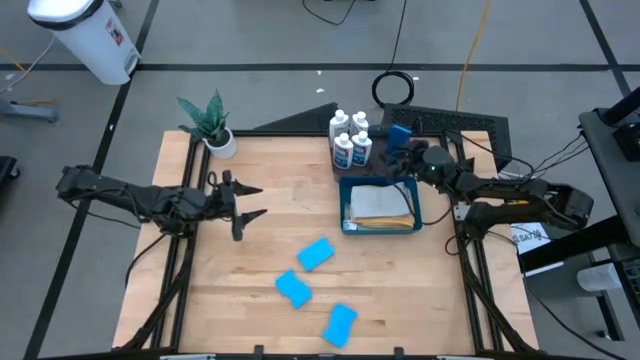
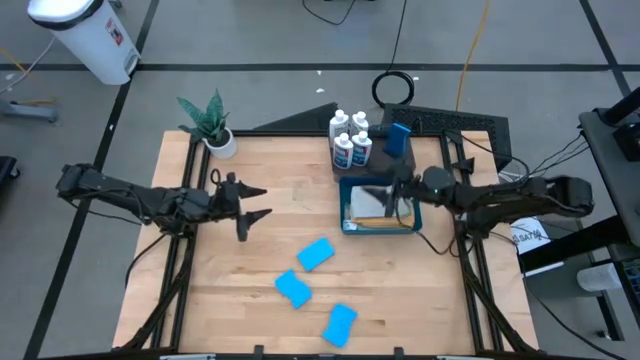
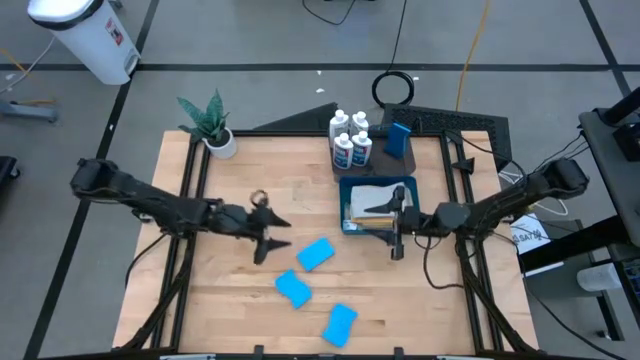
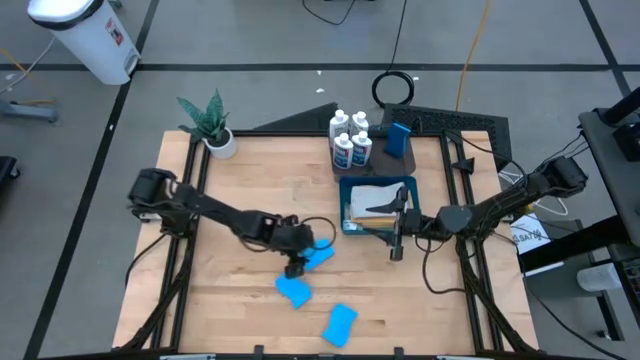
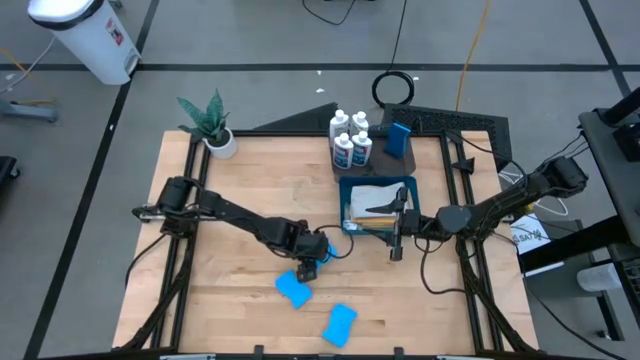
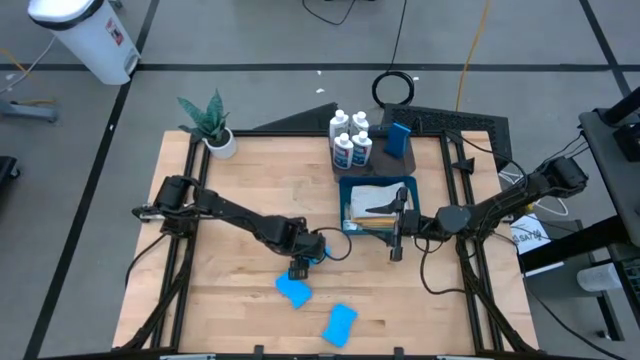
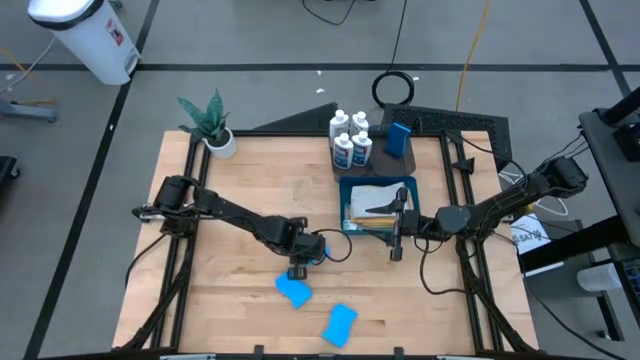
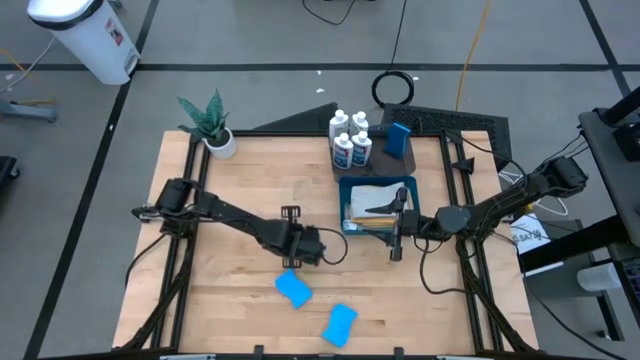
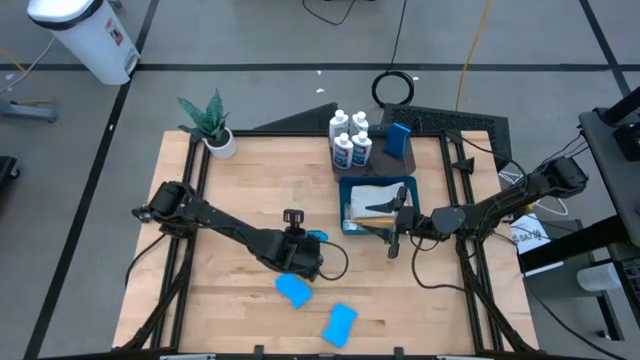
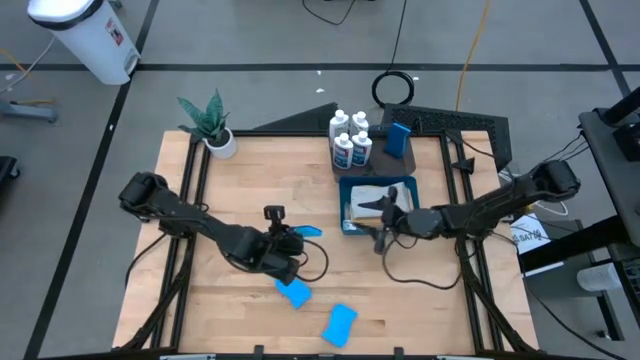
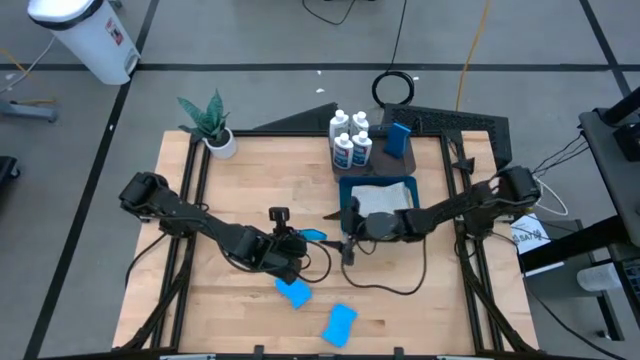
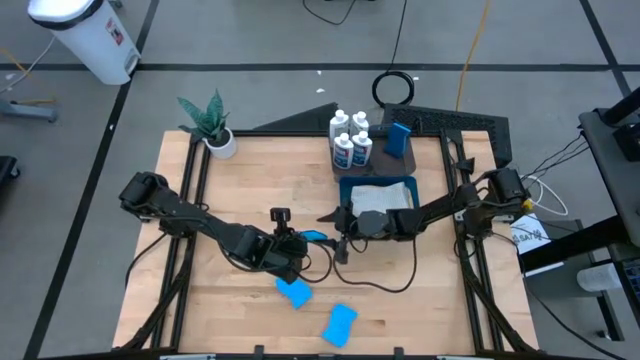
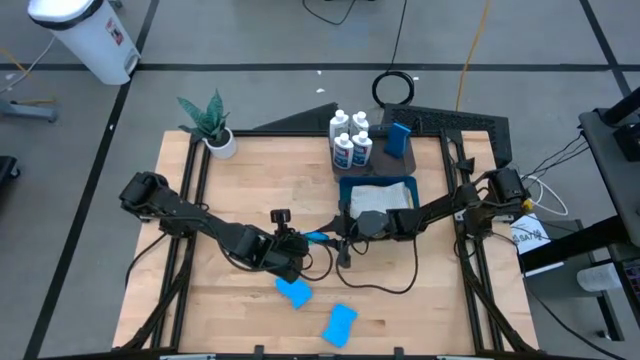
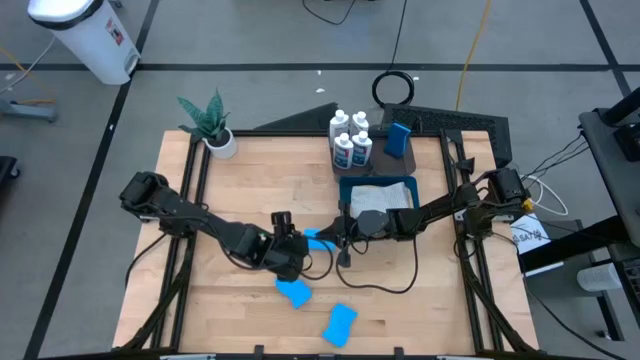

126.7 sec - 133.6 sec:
Task: Pick & Place Kitchen Items
Put the blue dishwashing sponge into the right black bin

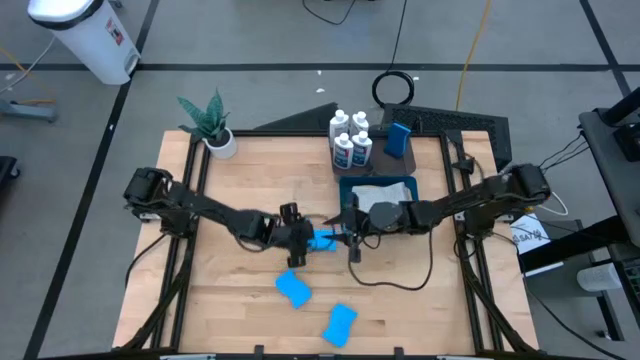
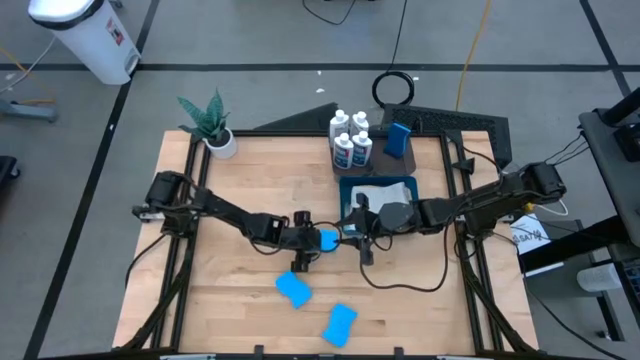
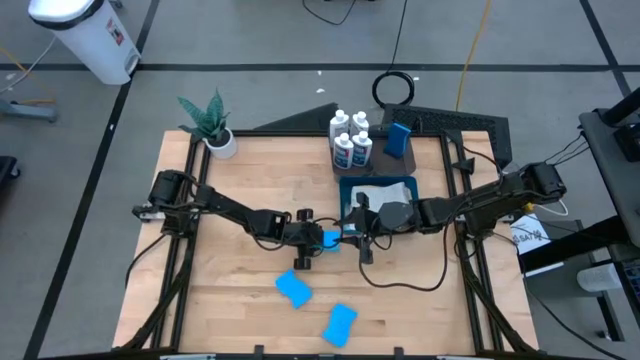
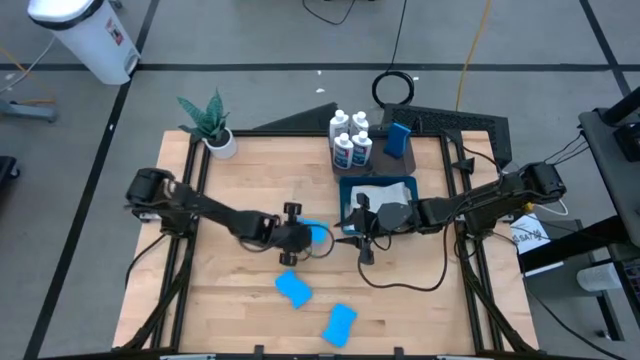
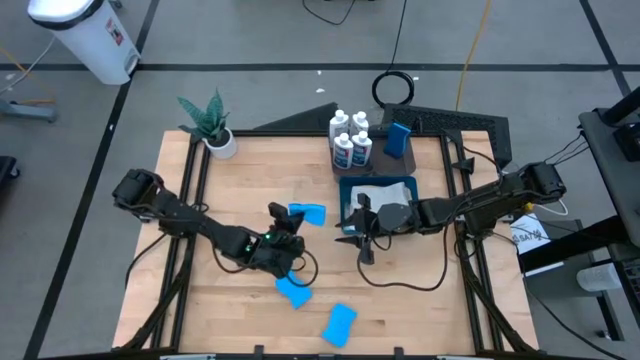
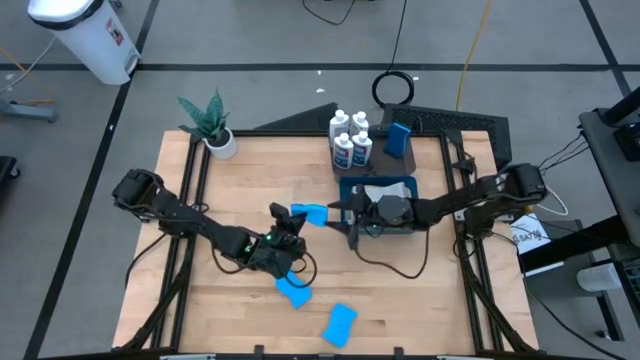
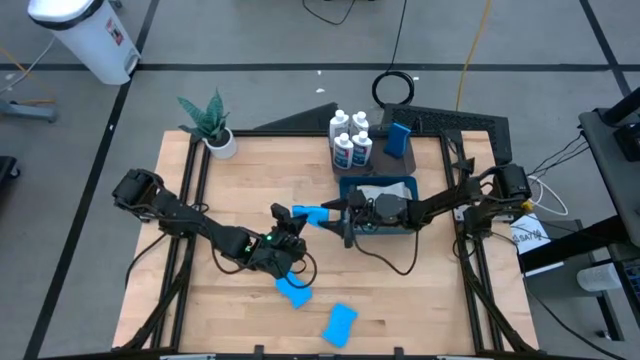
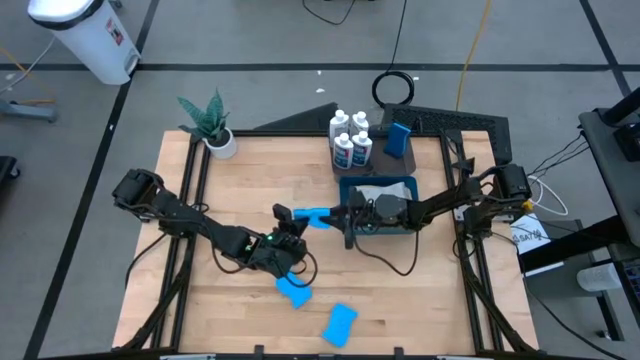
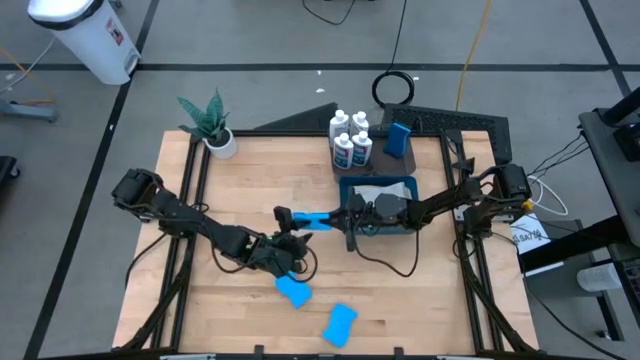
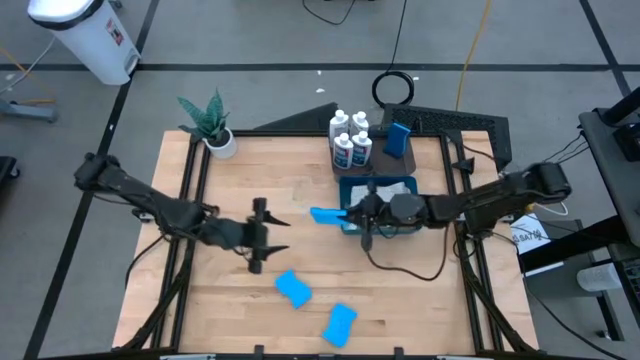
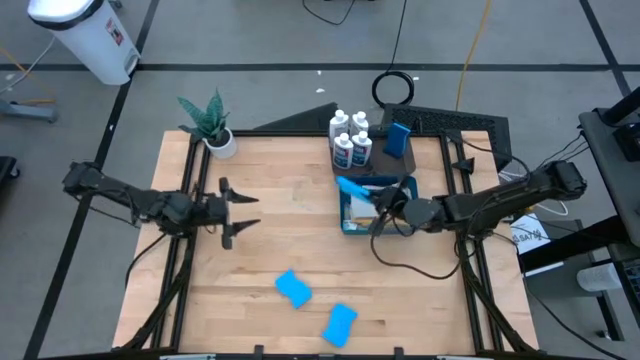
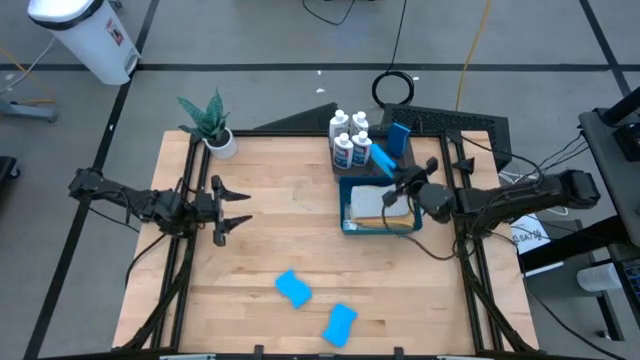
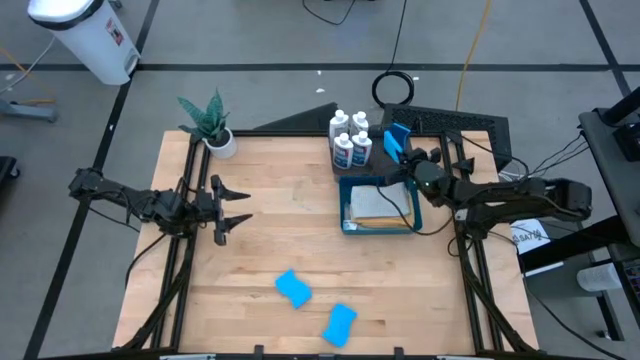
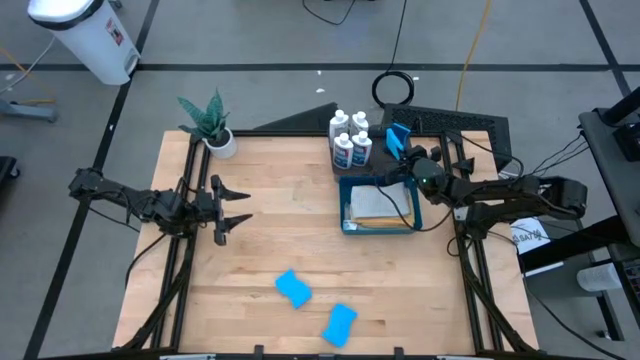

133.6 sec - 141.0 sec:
Put the blue dishwashing sponge into the right black bin

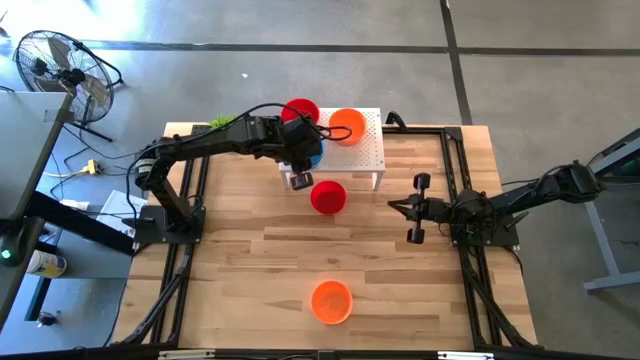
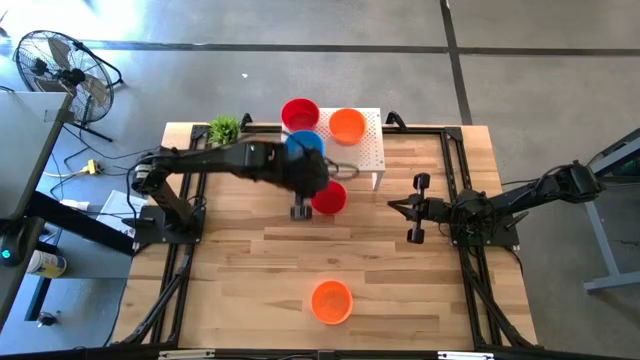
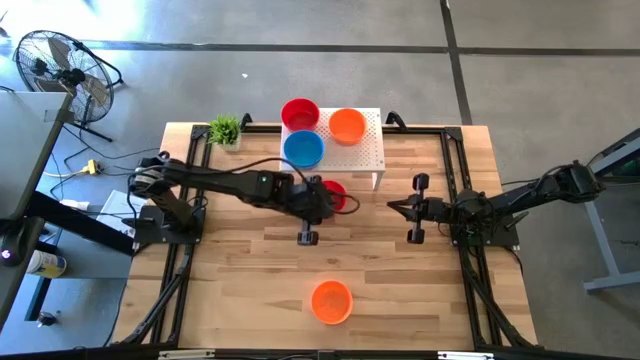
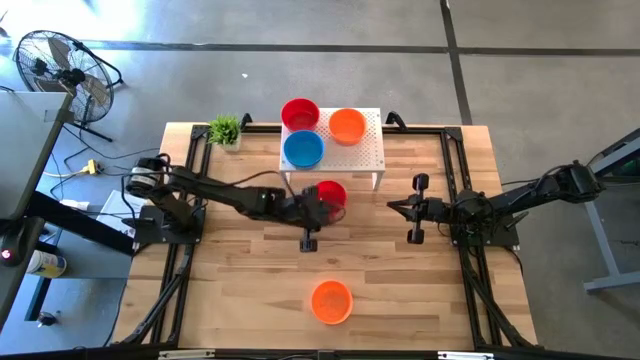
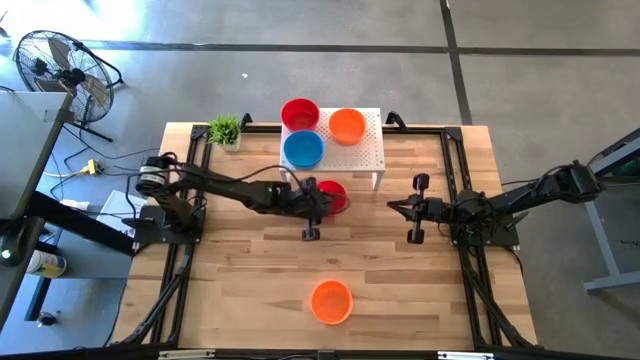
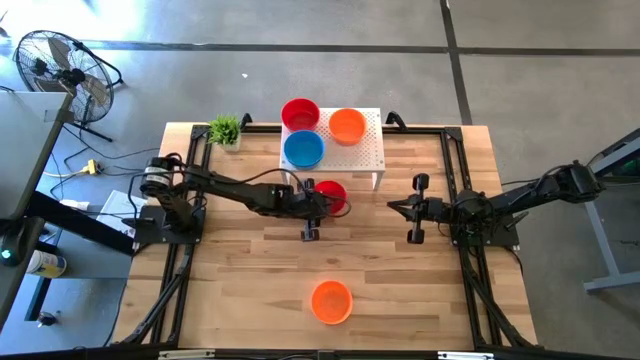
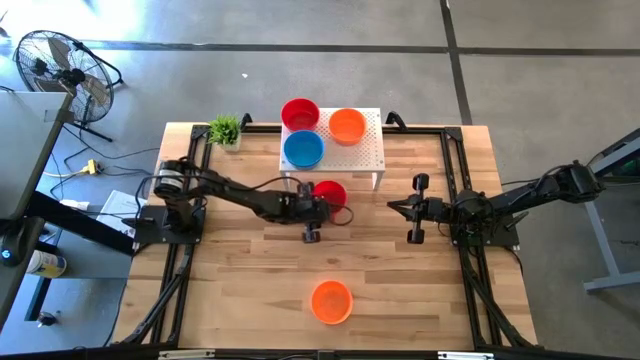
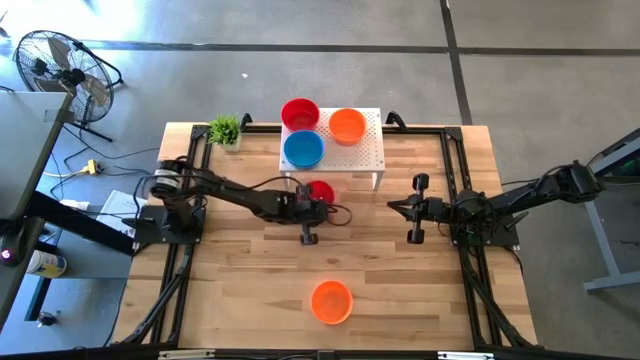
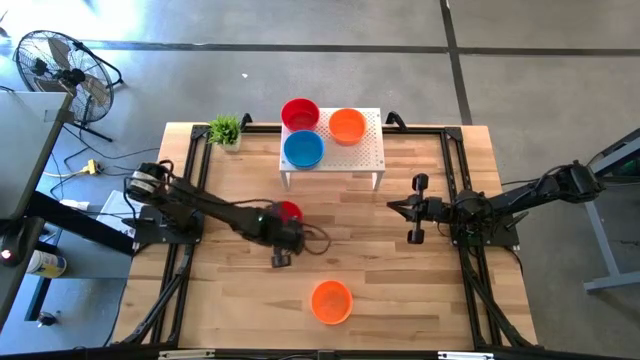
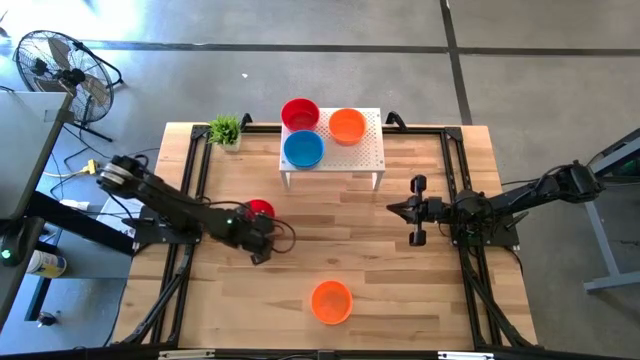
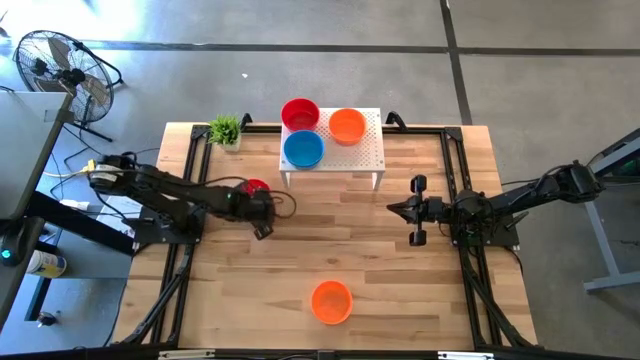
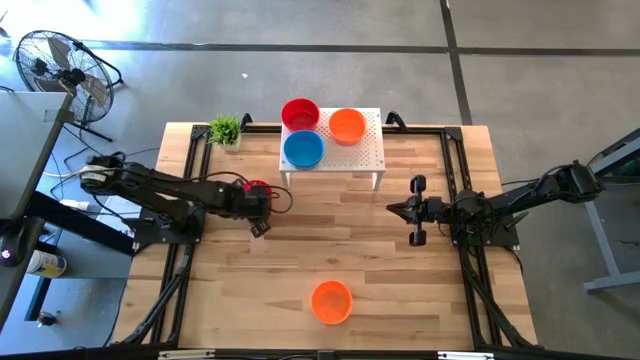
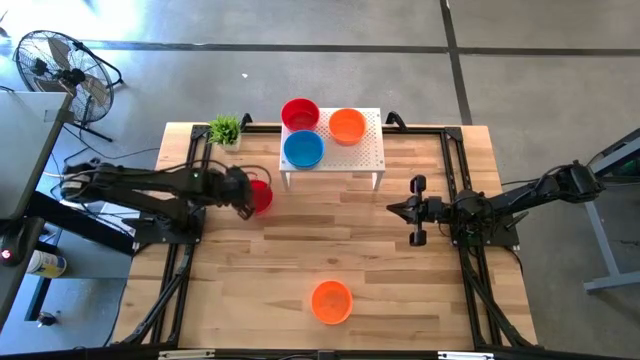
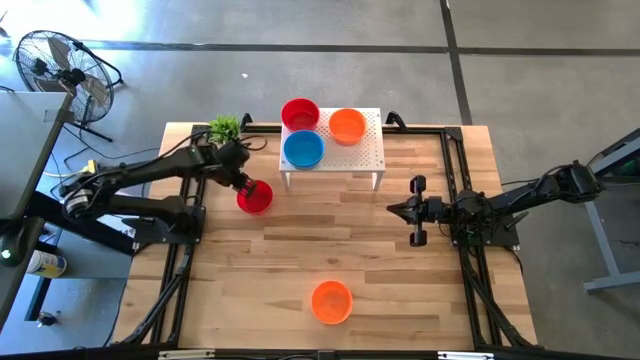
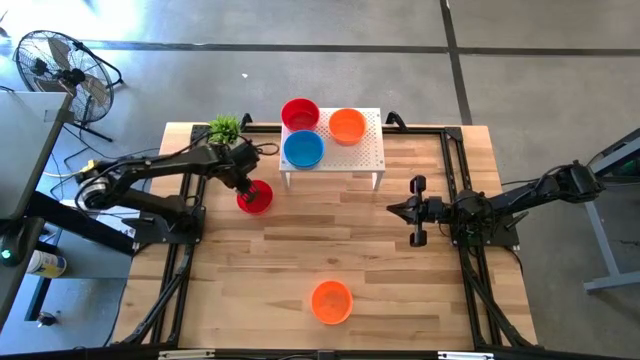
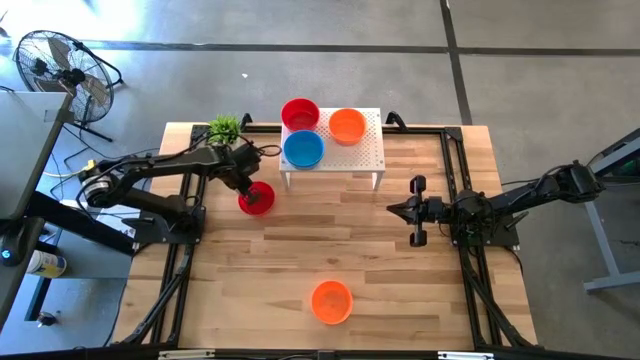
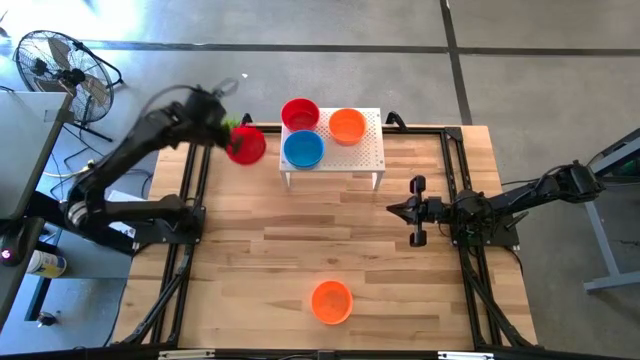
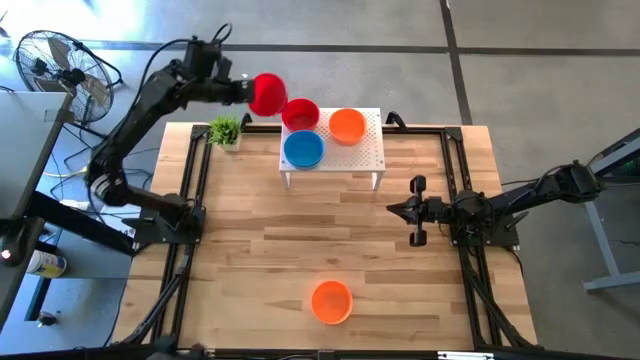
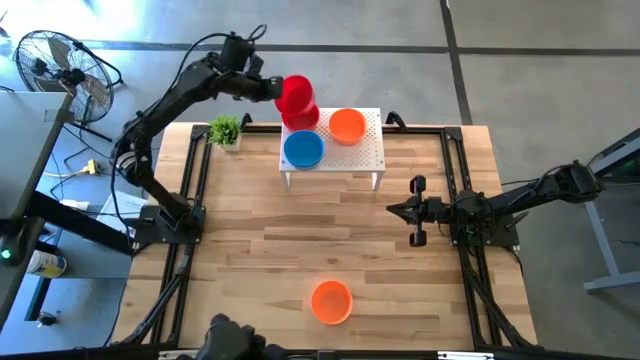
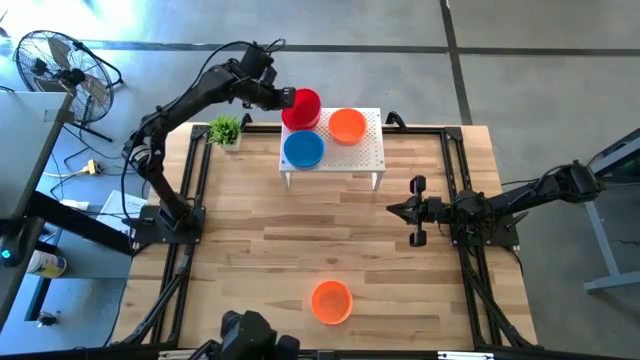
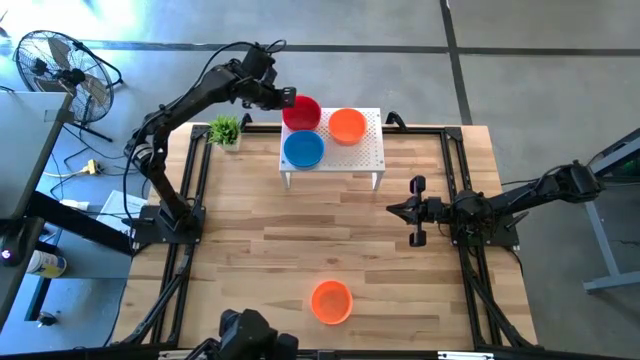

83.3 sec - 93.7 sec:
Task: Pick & Place Mini bowls
Stack the red bowl on top of the red bowls on the shelf
